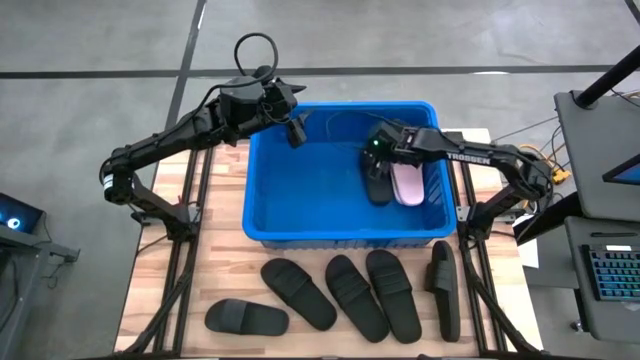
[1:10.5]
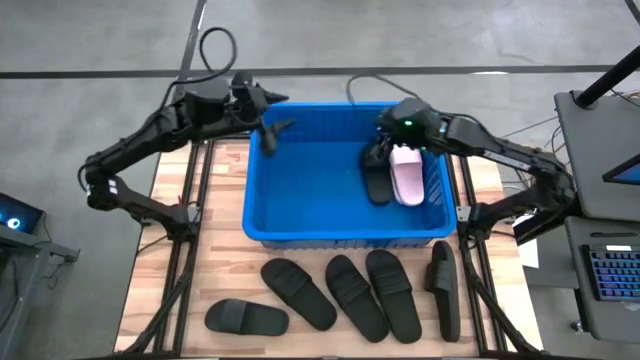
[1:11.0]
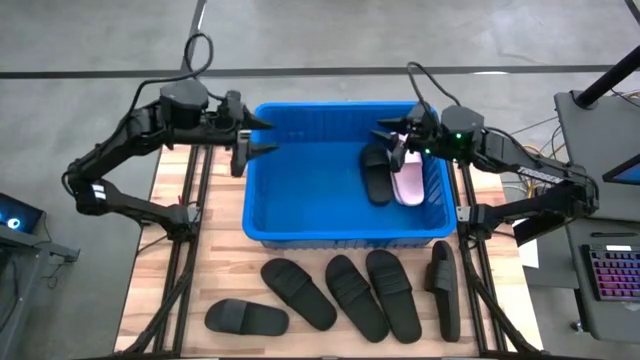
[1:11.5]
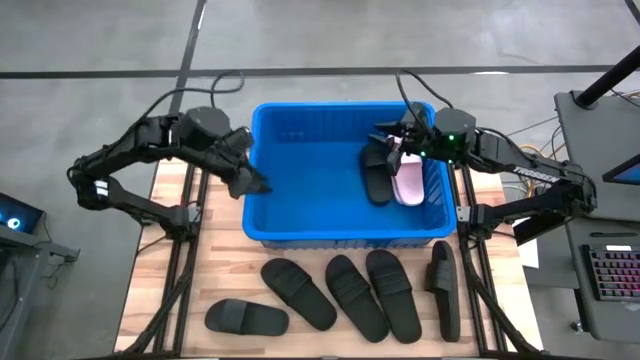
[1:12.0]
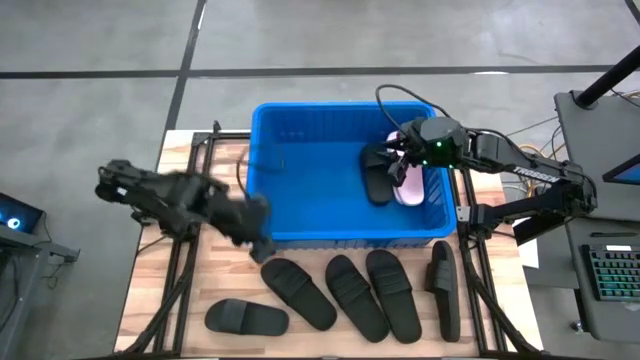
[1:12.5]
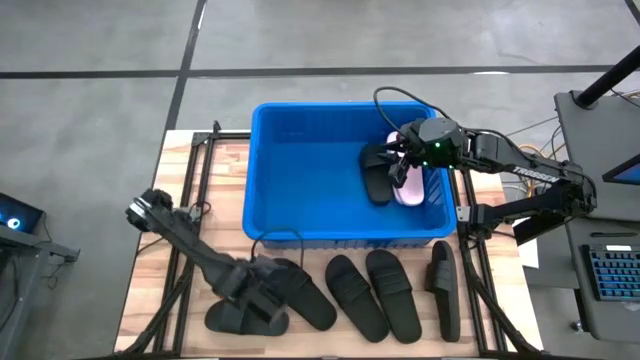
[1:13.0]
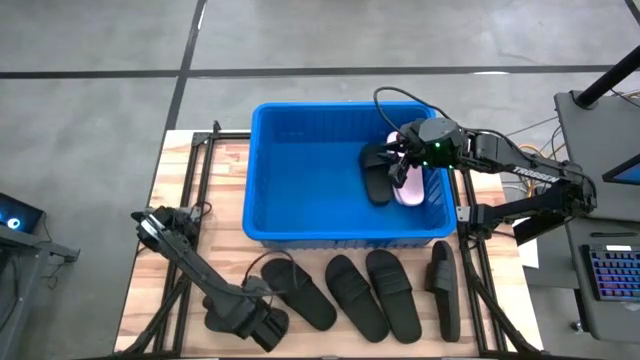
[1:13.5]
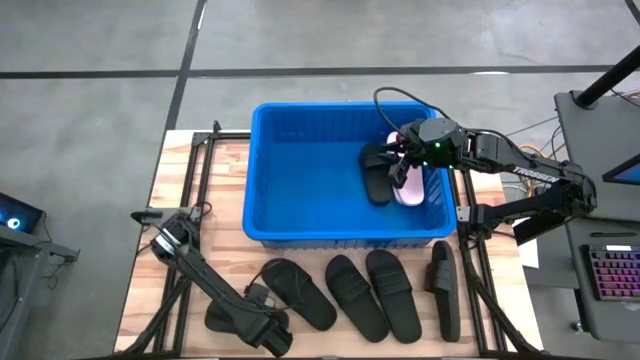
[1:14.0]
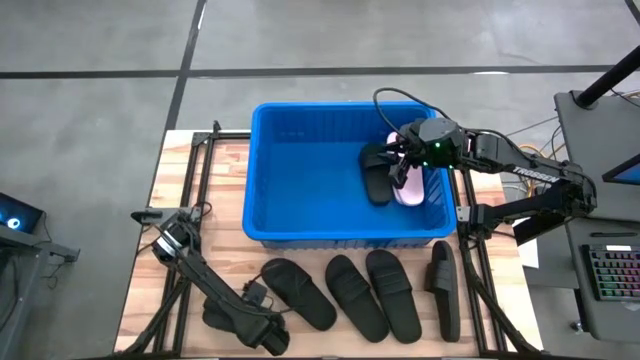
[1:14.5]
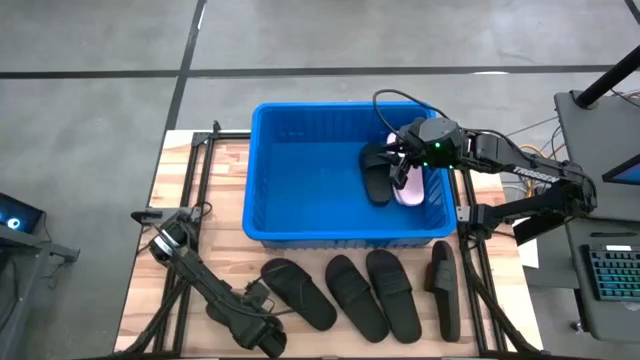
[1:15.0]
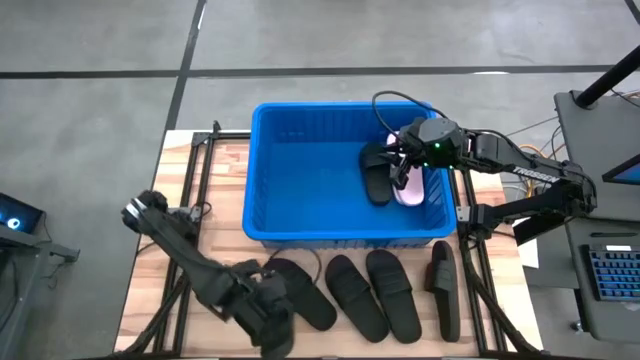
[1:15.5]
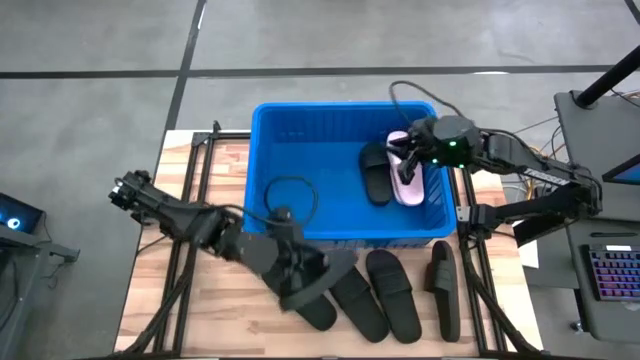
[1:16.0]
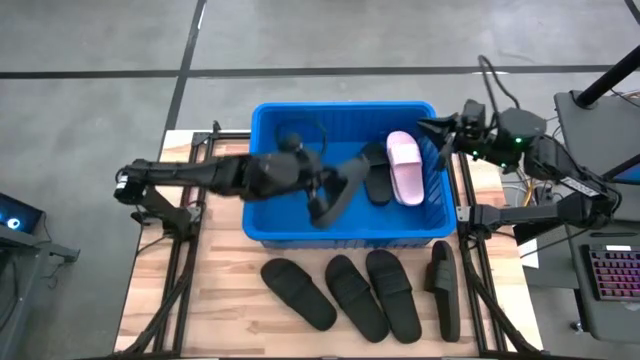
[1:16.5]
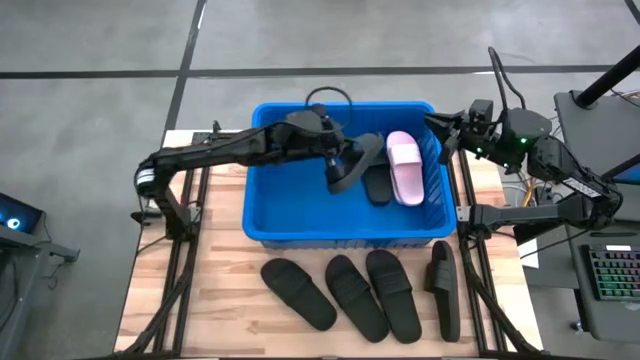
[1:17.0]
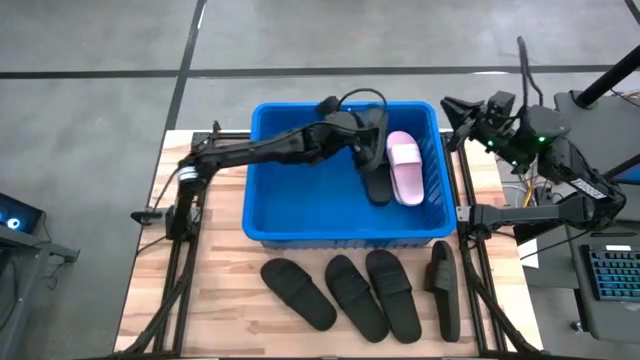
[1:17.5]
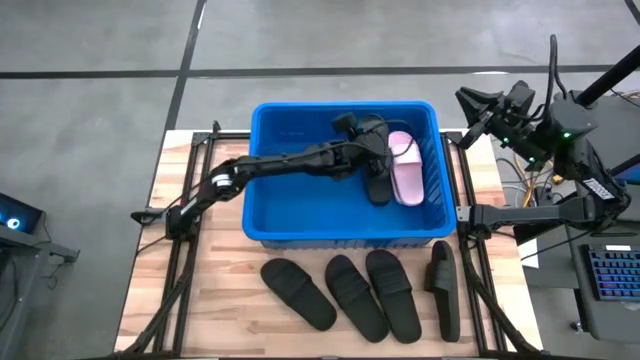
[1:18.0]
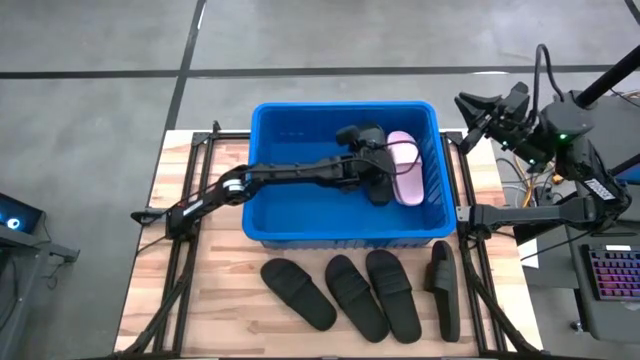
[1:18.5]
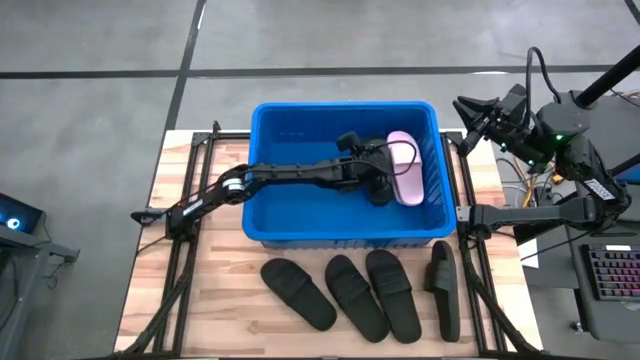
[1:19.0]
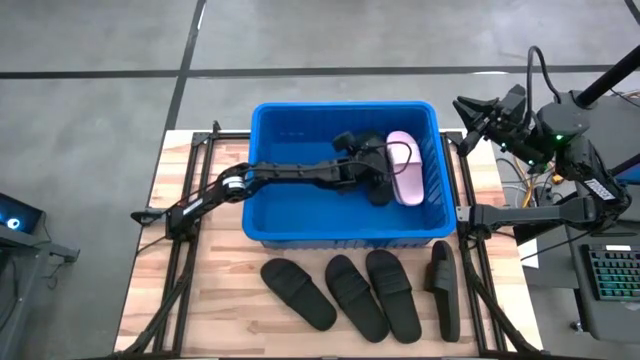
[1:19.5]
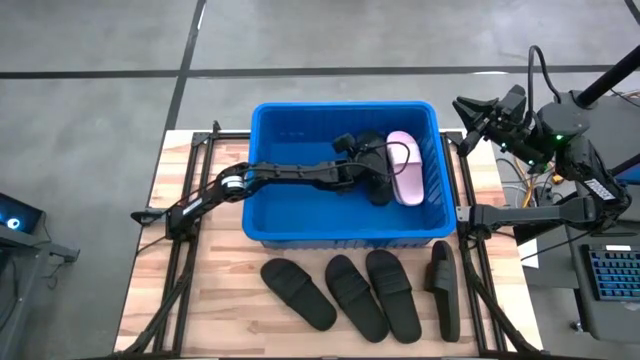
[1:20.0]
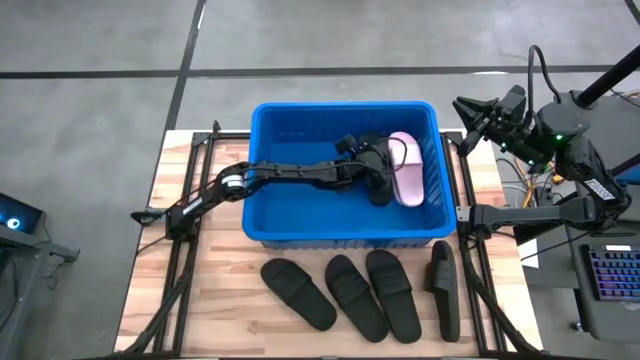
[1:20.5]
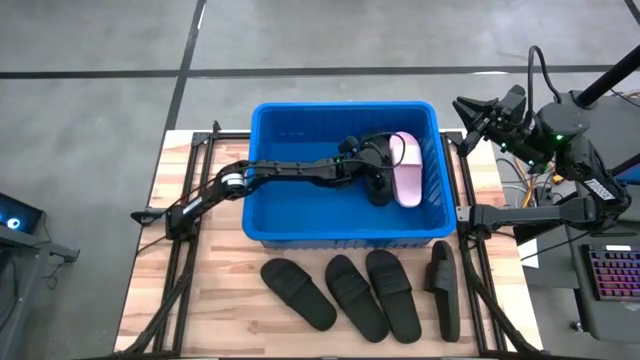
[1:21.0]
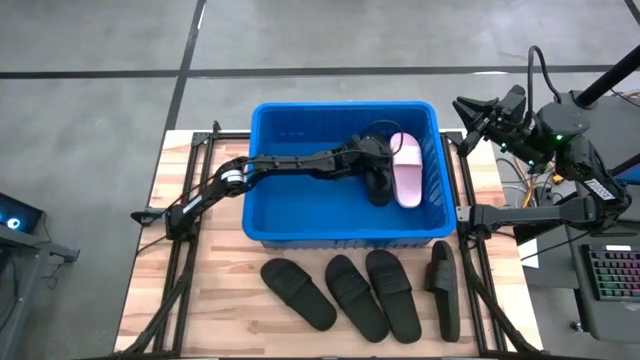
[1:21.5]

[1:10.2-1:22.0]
Task: Pick and place slides into bin
Put the black slide into the blue bin

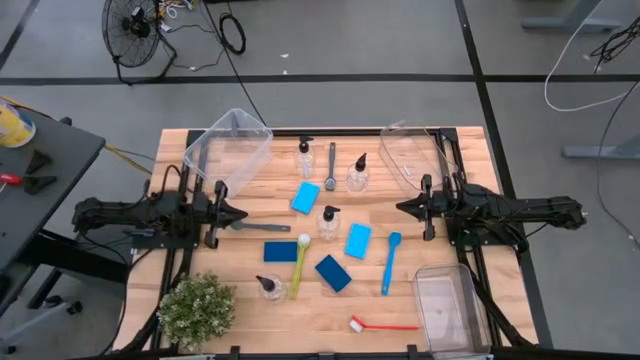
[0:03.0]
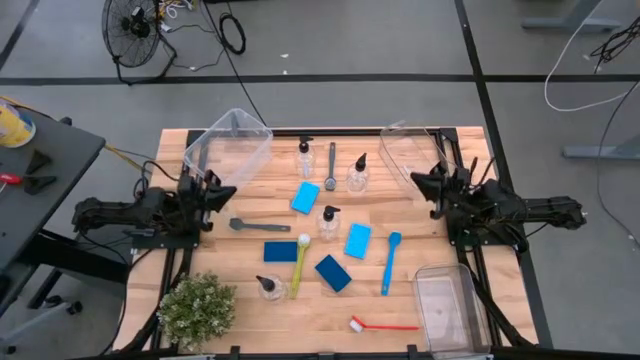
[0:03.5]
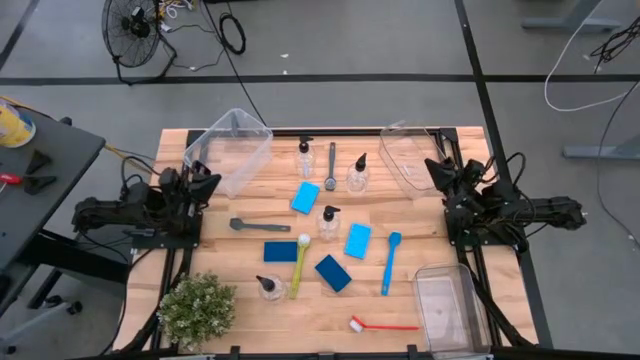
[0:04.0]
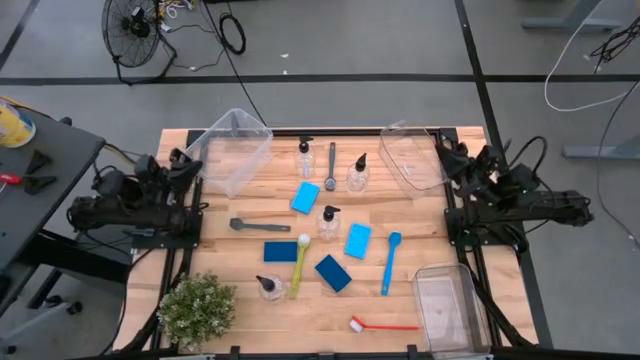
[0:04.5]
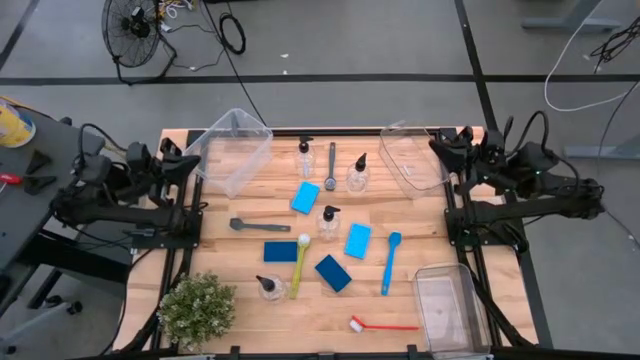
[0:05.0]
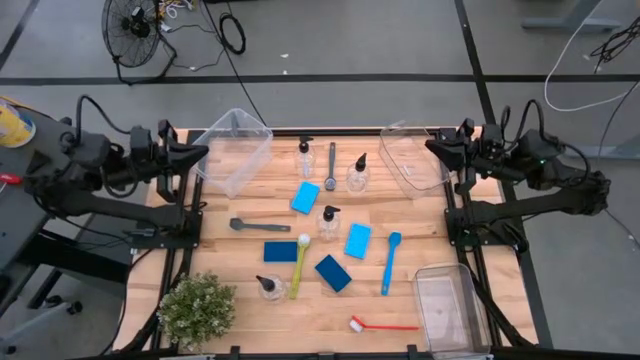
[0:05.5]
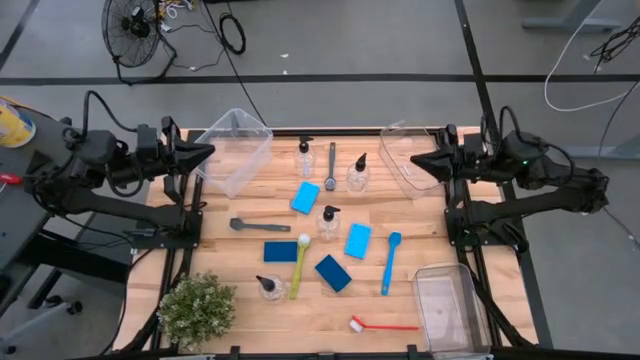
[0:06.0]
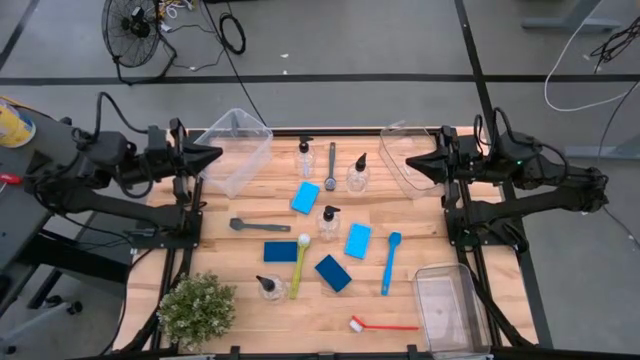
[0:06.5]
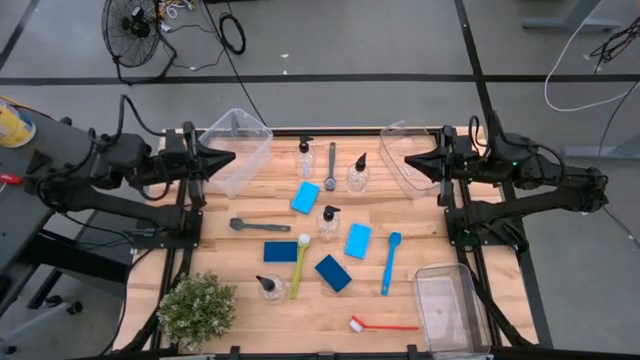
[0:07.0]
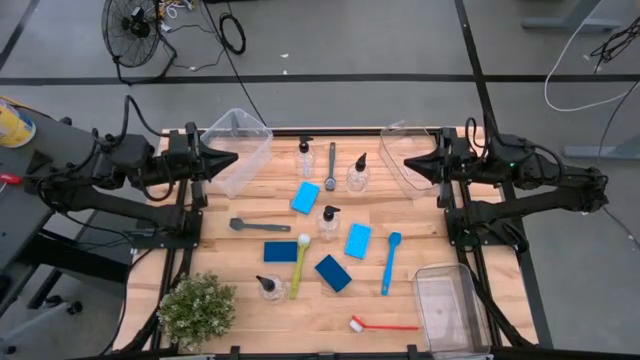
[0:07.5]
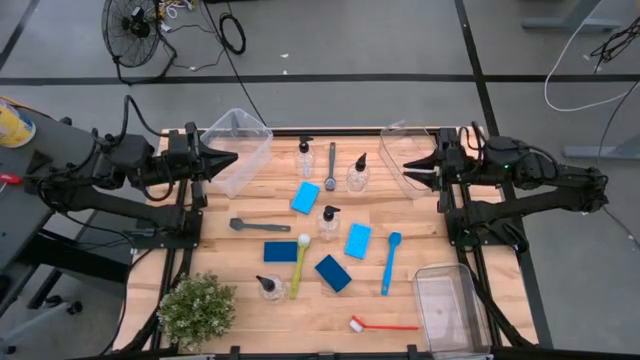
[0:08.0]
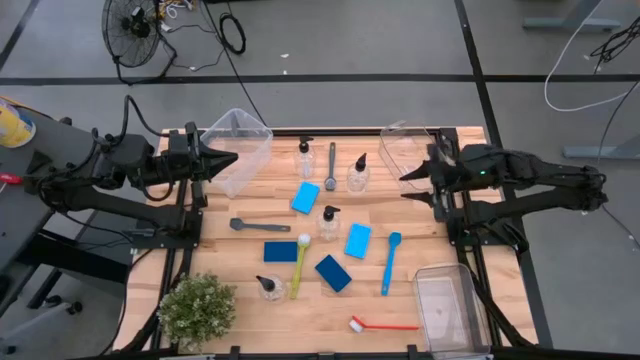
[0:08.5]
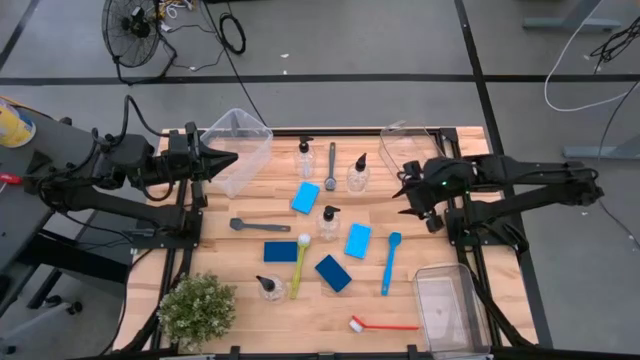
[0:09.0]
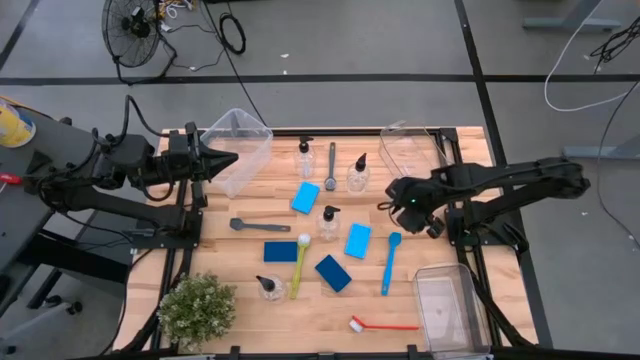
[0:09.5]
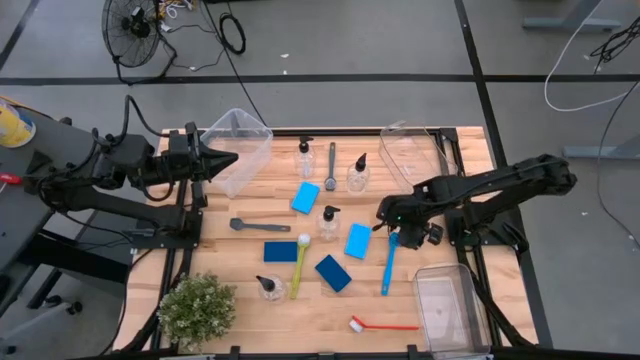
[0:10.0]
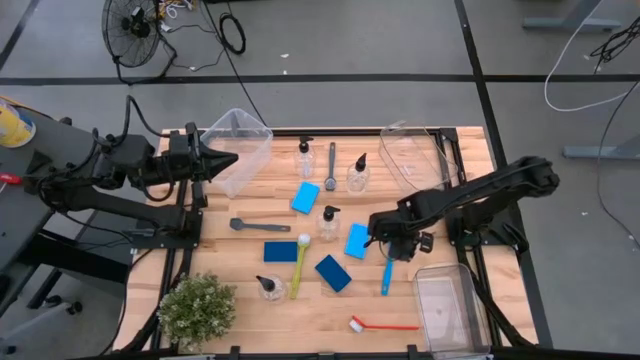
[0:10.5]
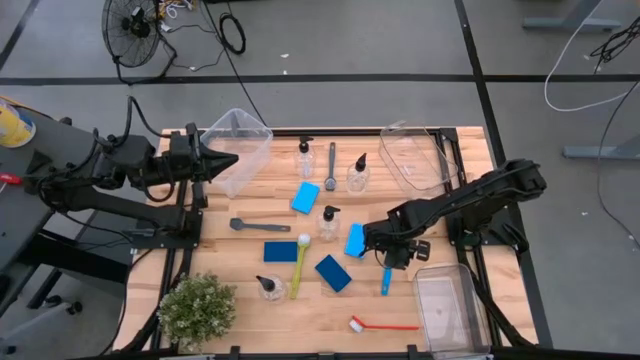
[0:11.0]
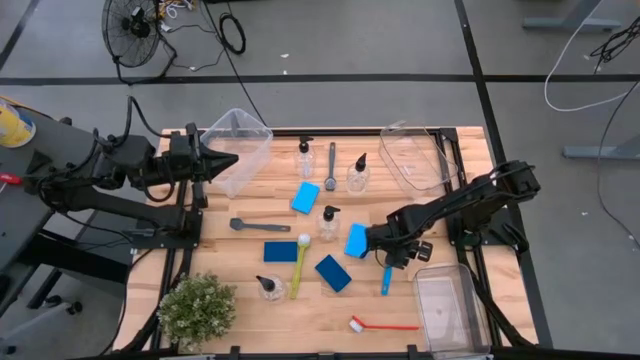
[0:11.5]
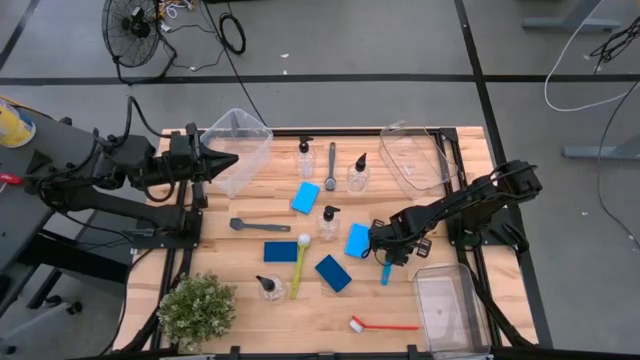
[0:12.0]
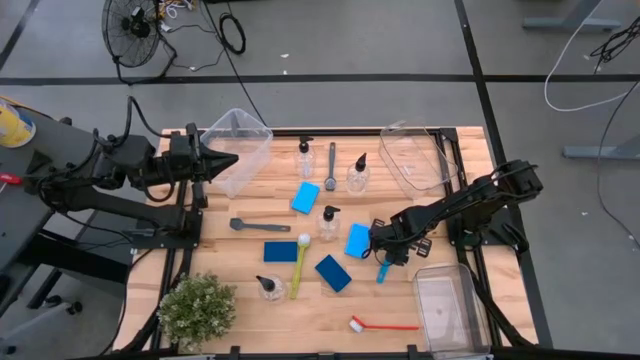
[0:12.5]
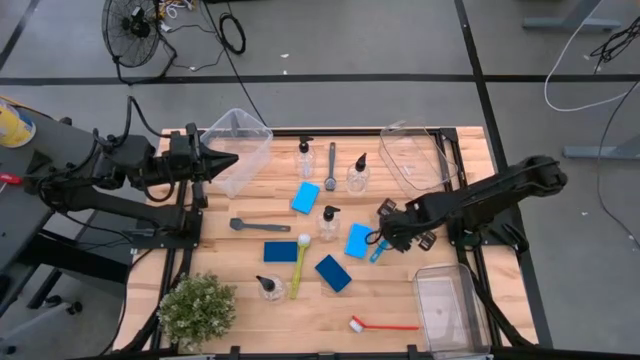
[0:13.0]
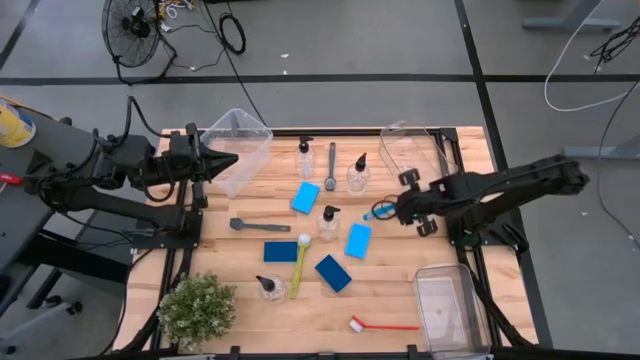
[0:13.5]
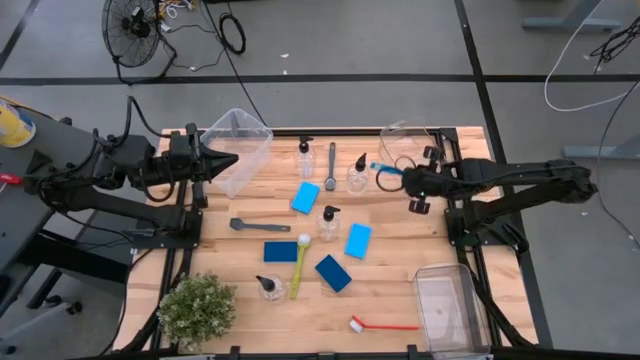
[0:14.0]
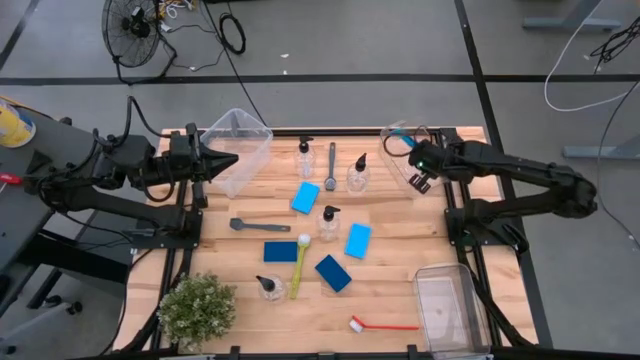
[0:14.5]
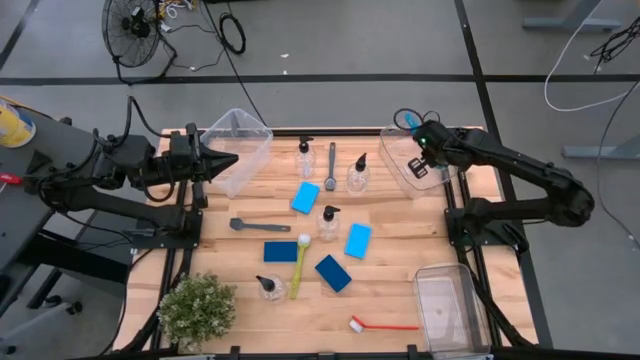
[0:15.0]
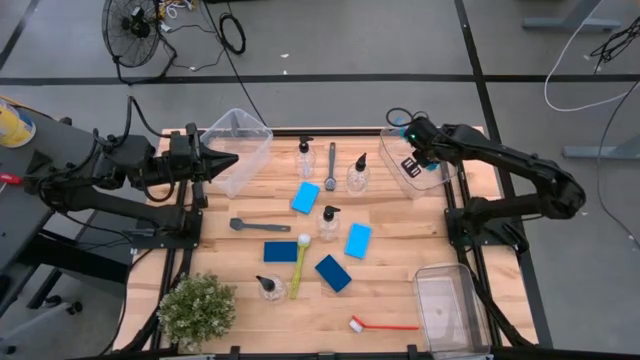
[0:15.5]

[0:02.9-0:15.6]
Task: Pick & Place Kitchen Sink Supplies
Put the blue cleaning brush into the top transparent bin
